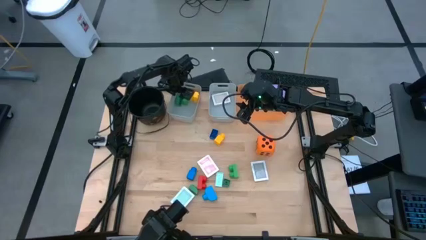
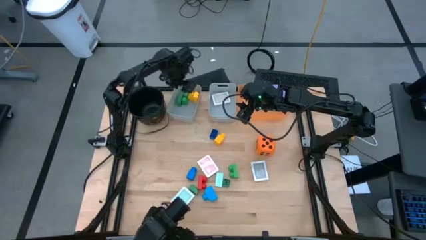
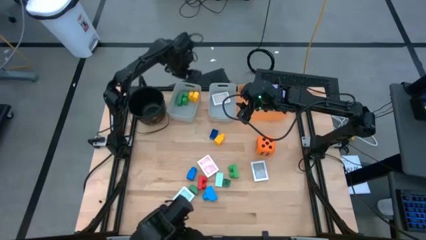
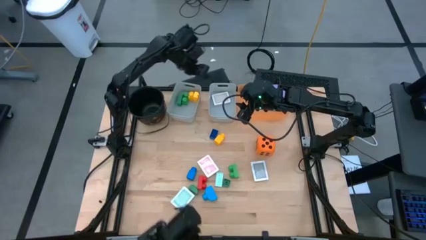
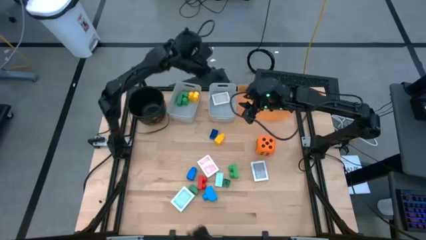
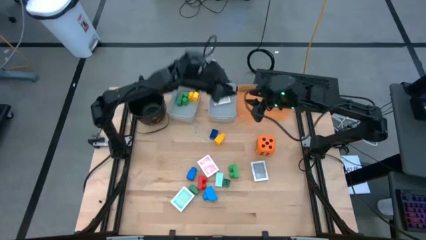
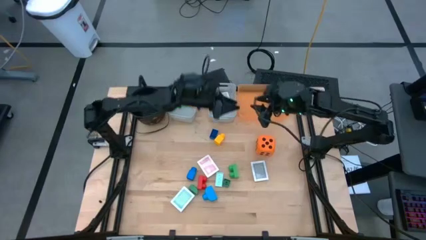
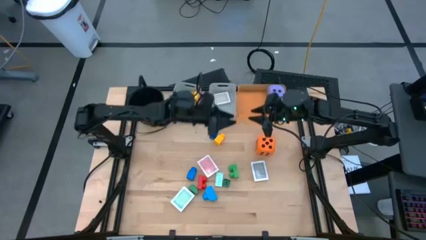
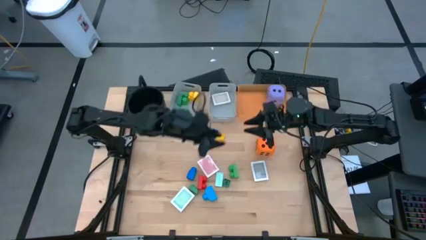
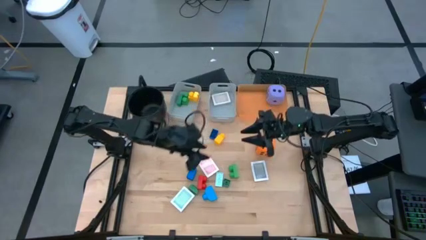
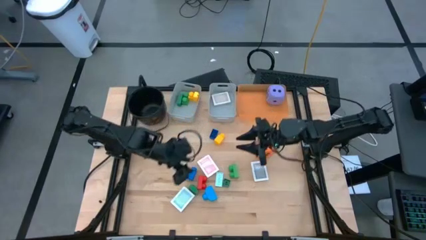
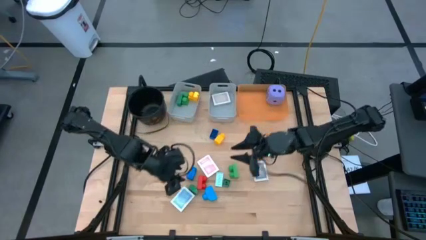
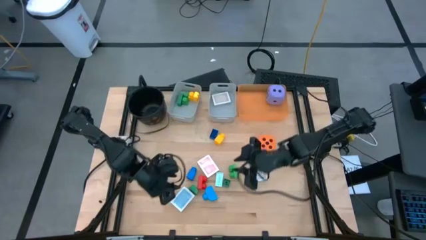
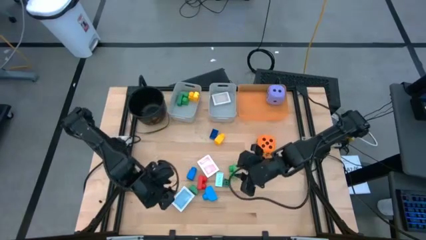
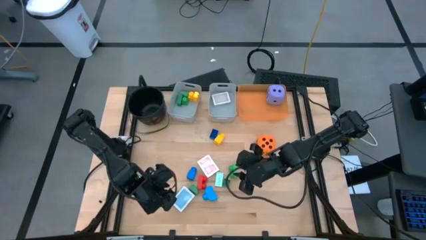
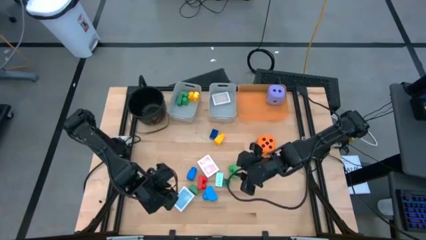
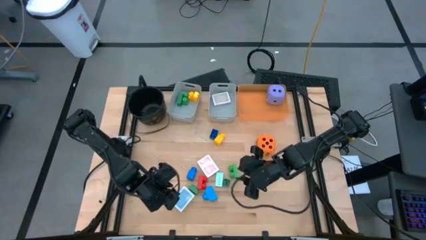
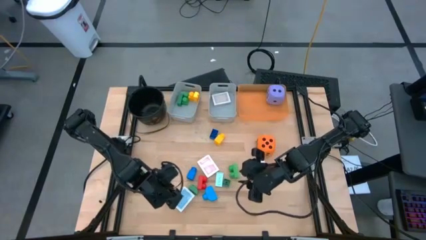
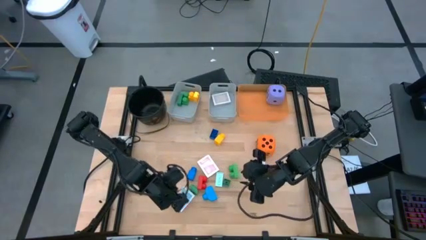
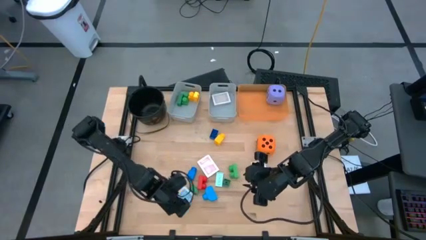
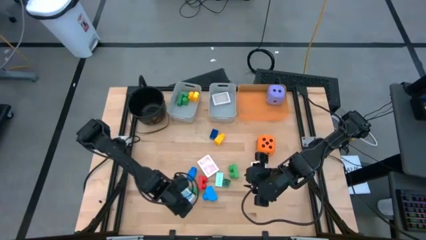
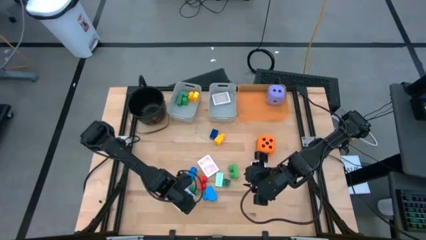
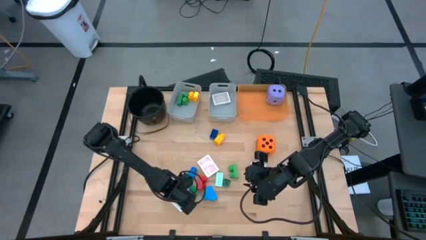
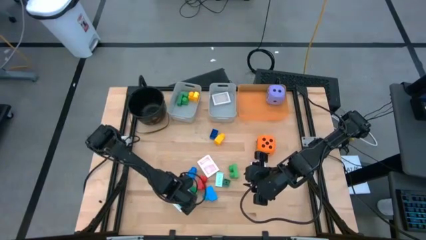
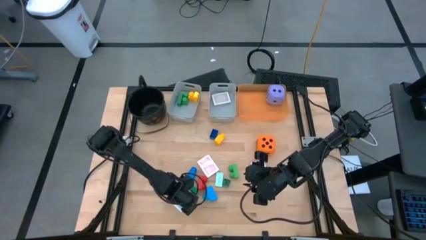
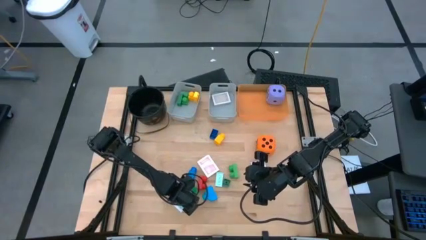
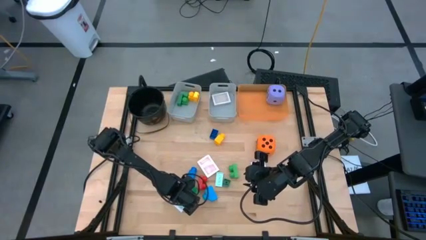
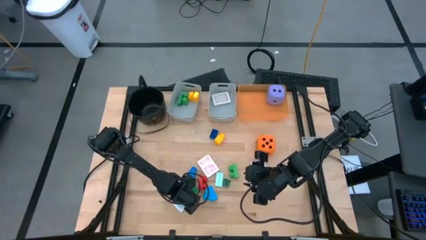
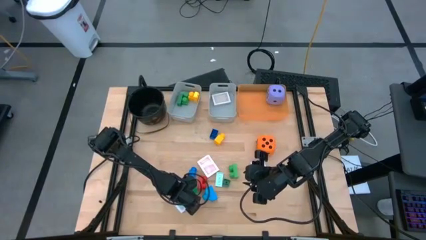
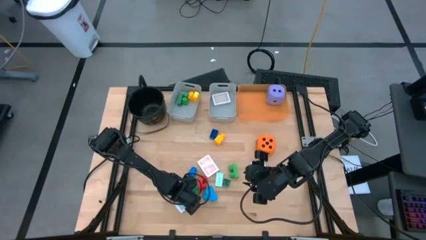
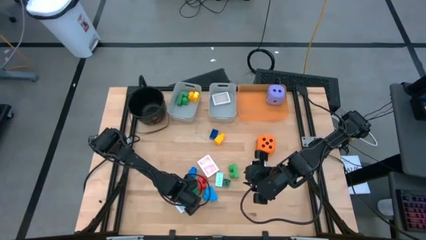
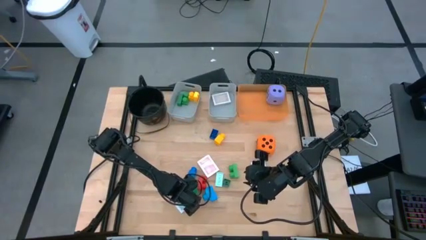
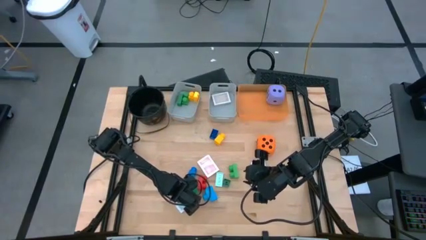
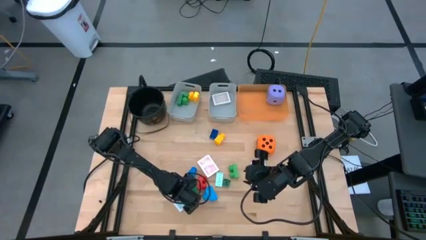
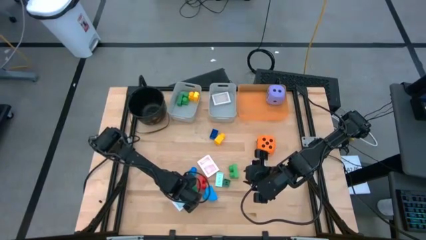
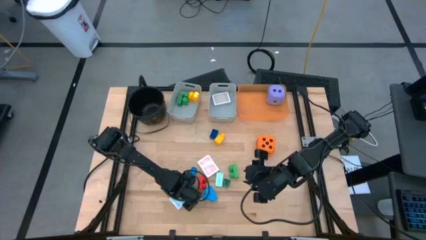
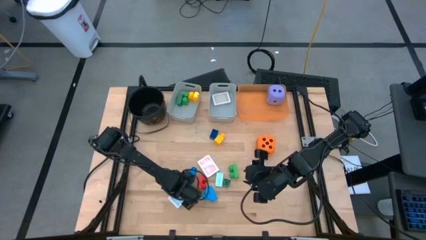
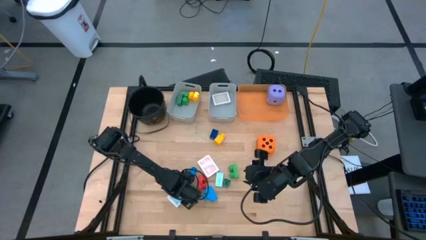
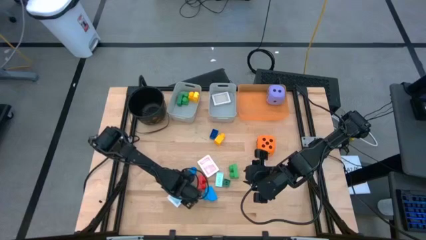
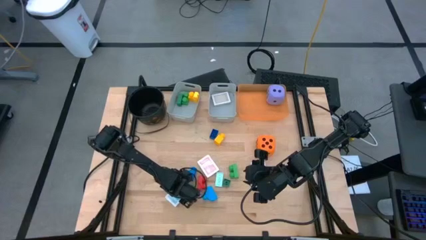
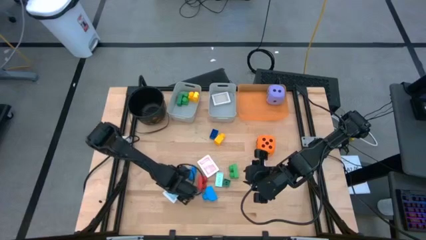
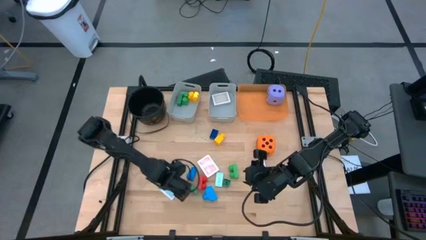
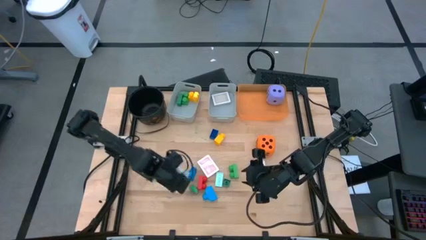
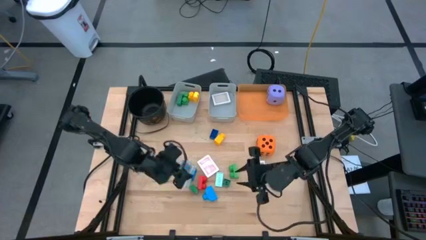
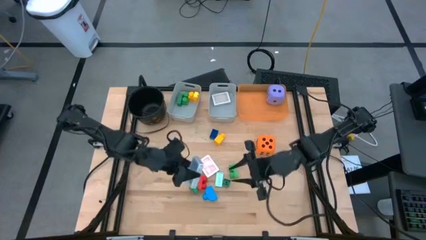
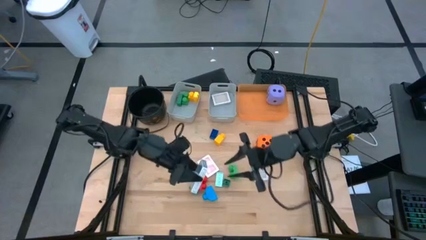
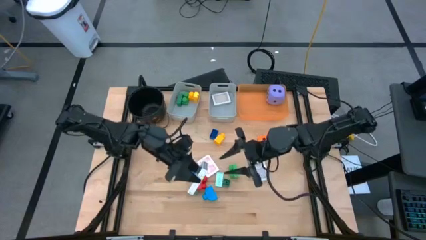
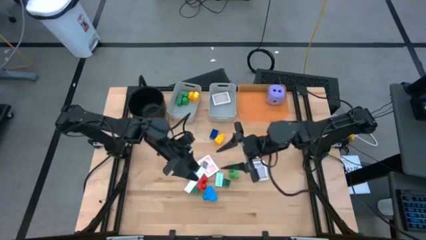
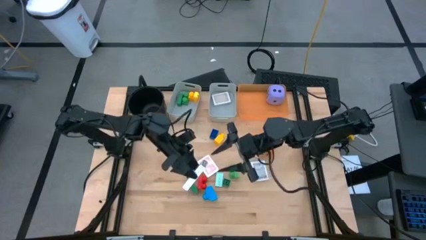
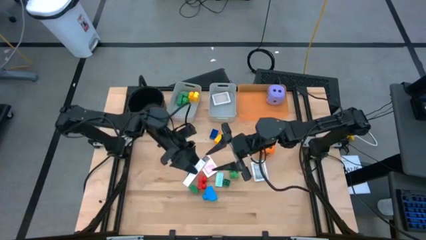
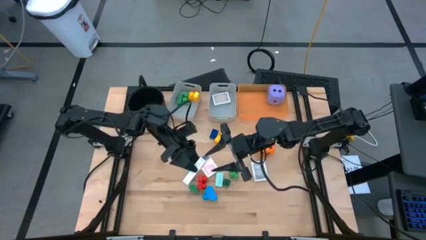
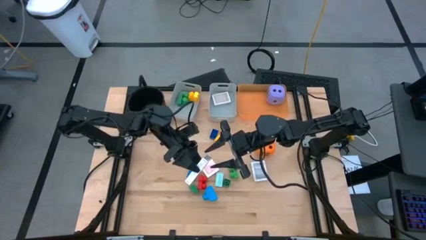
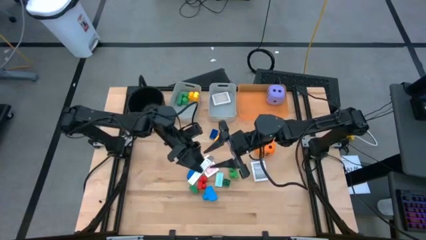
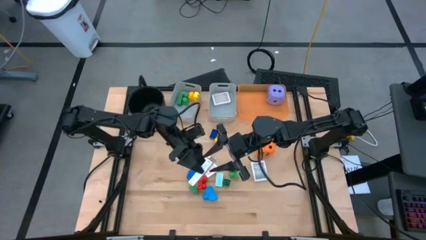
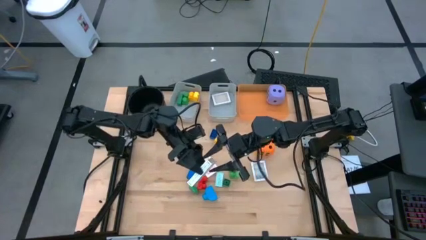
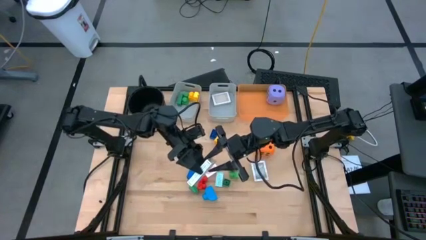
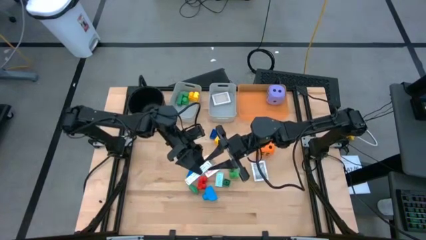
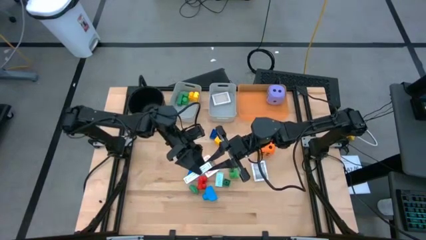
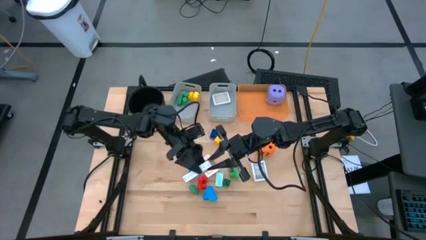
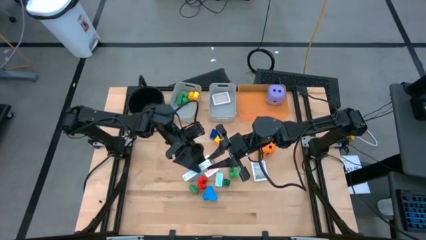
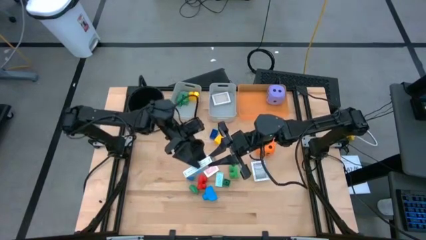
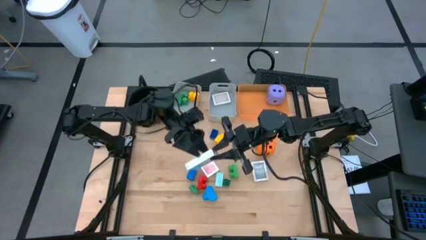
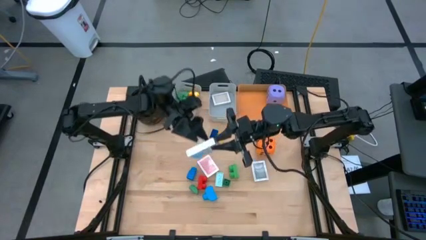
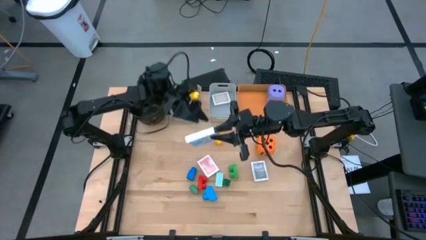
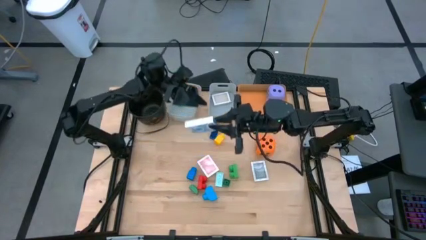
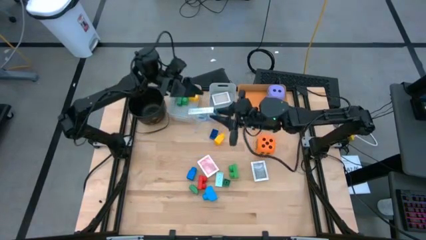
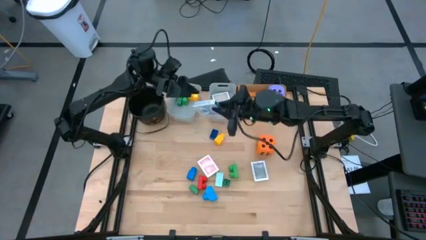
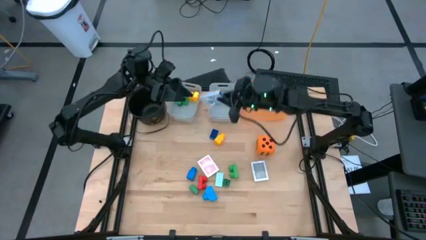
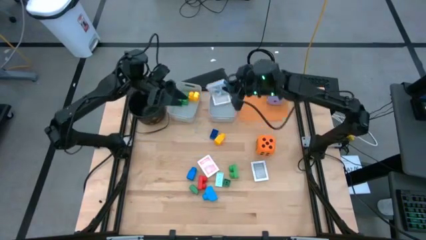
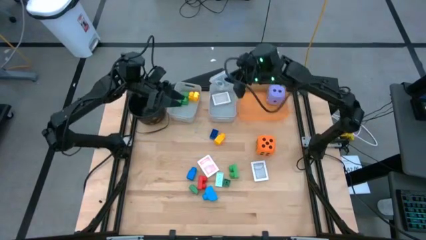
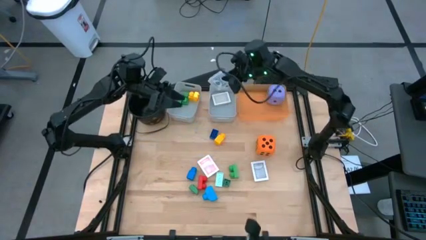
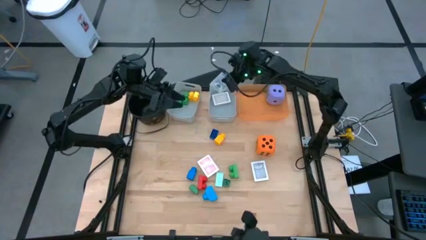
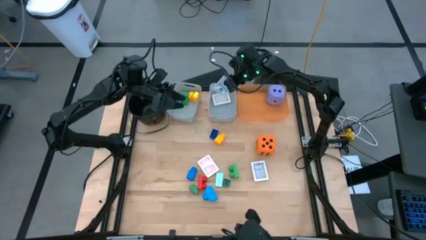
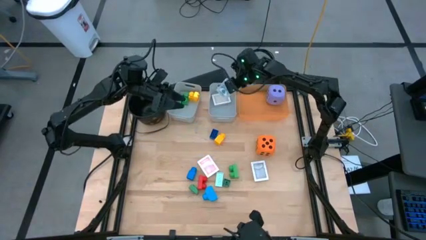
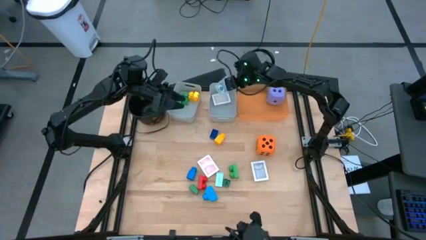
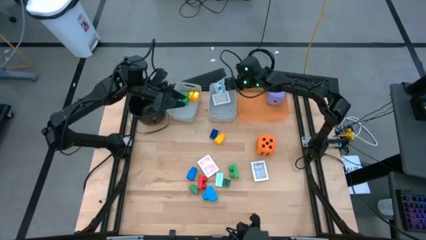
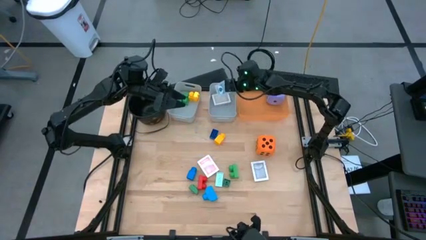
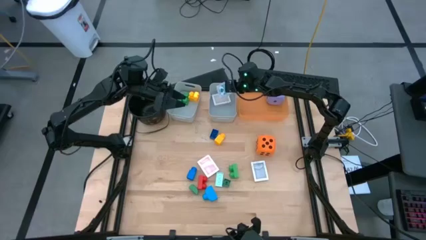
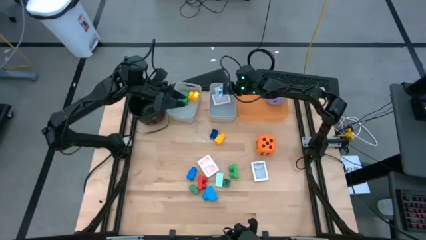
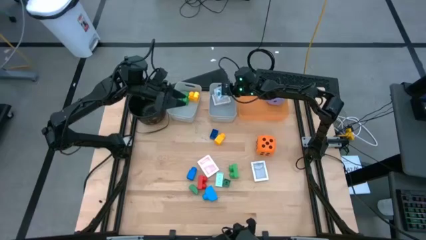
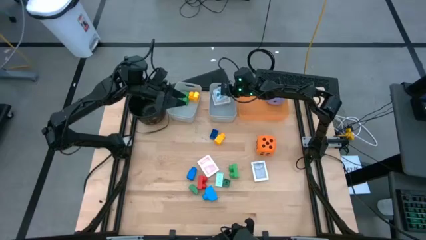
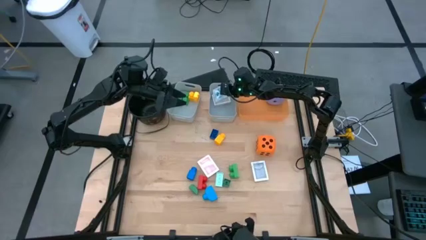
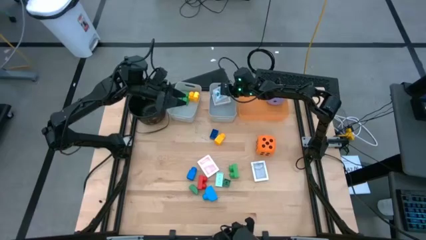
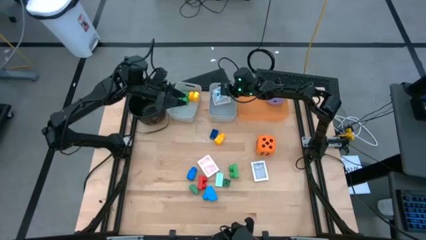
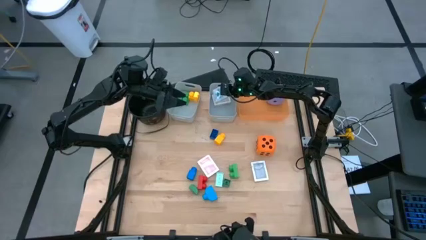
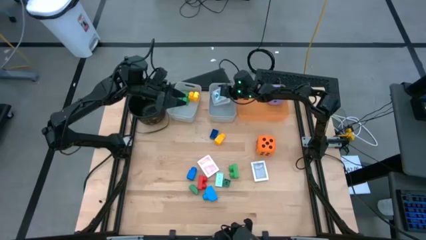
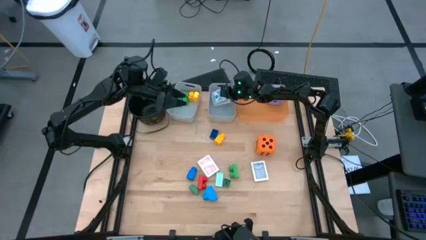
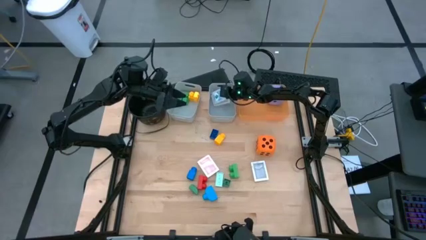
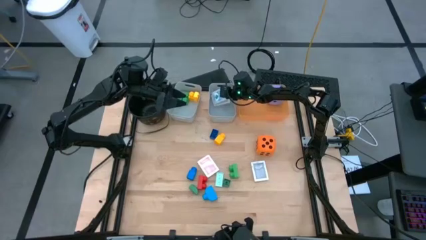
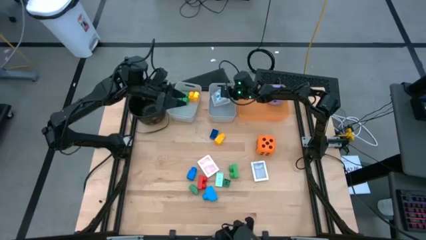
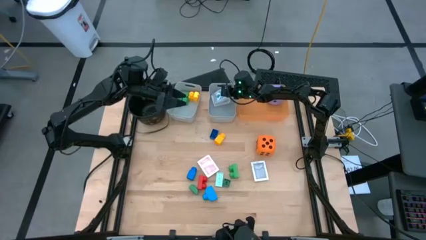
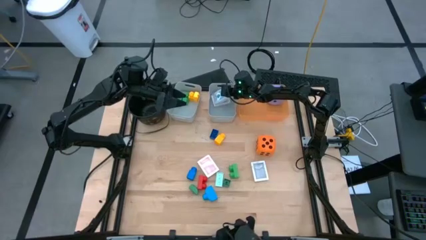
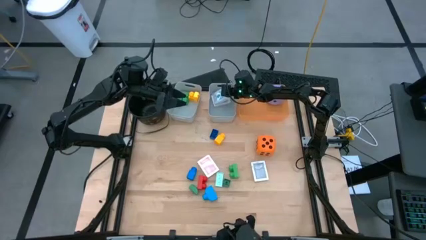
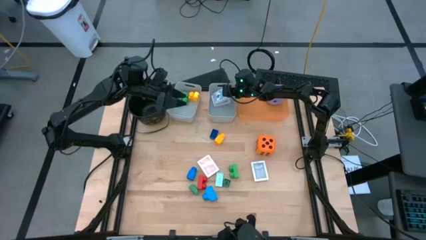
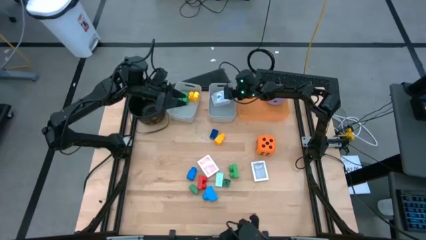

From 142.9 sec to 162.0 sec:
Task: Pick & Place Toys
Put the blue deck of cards into the right gray bin
